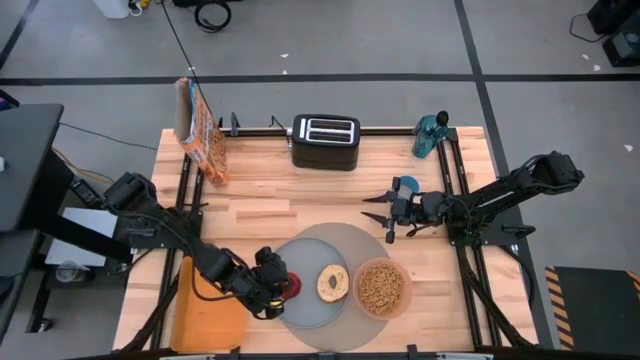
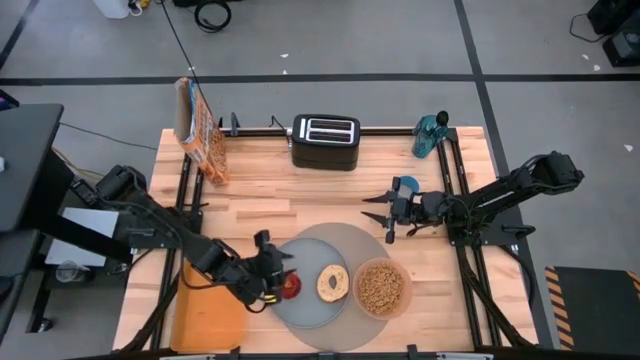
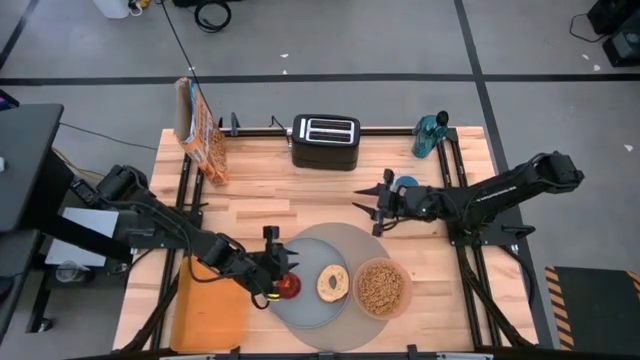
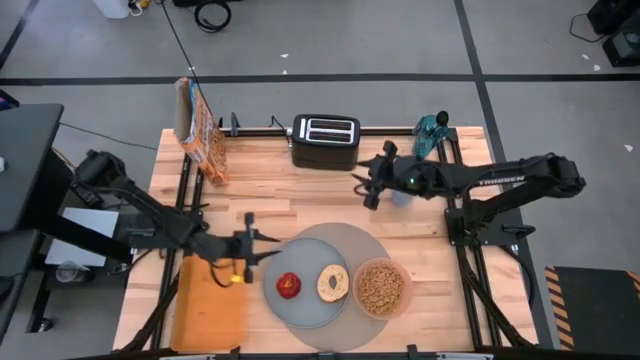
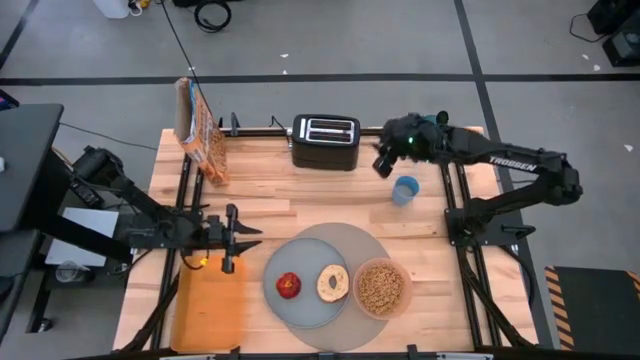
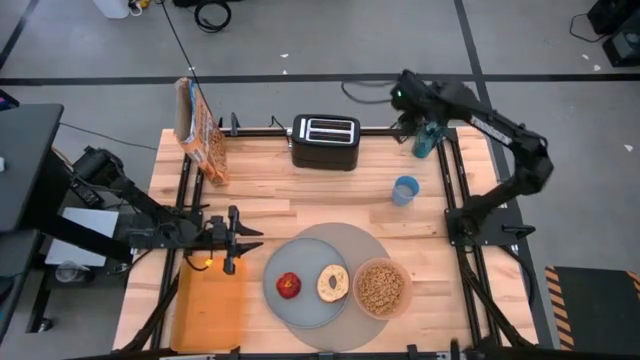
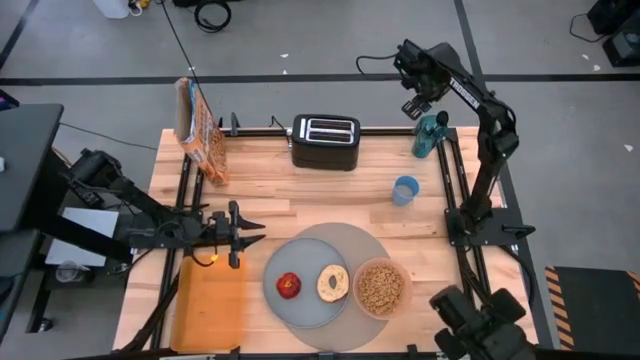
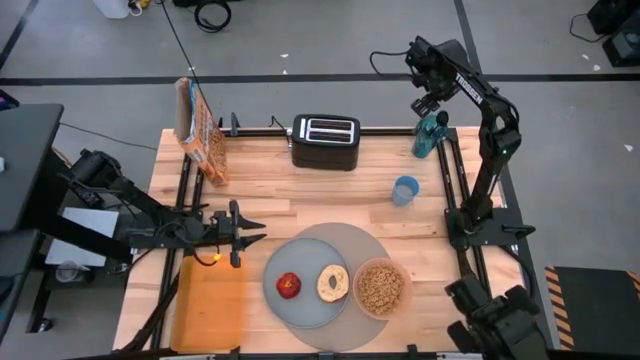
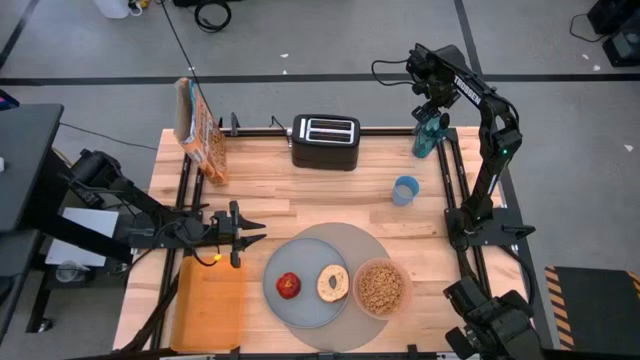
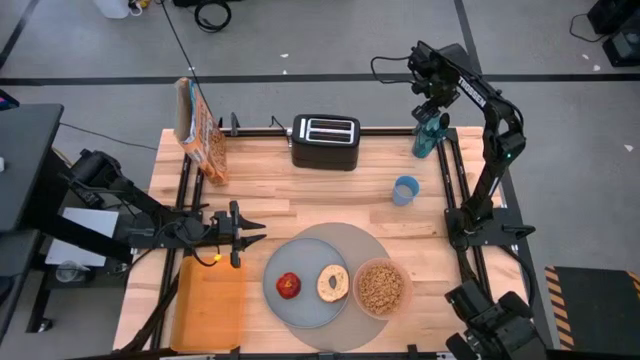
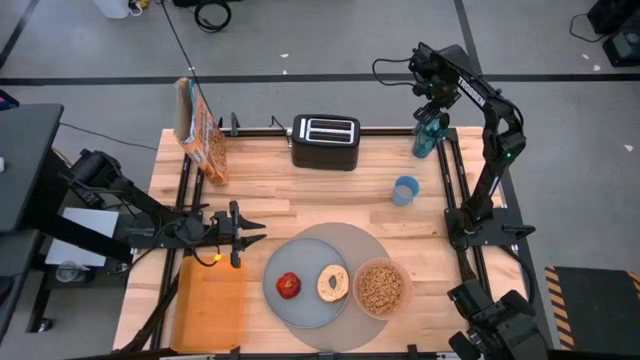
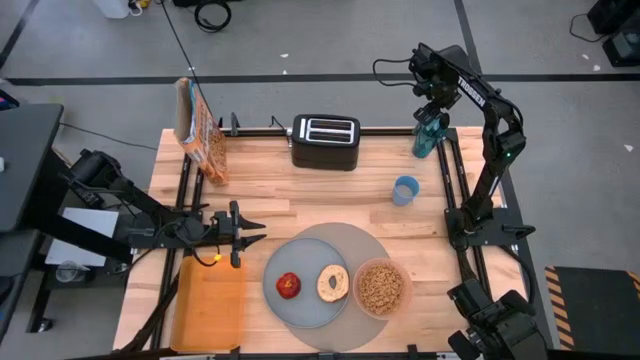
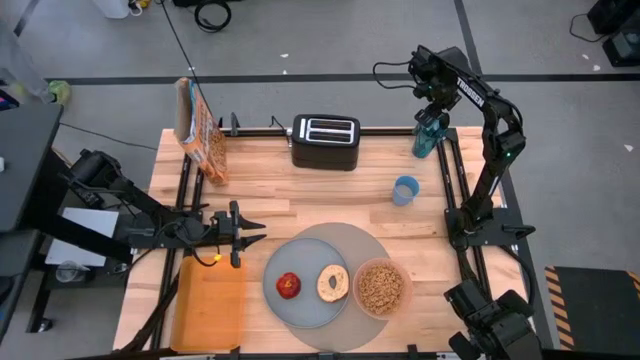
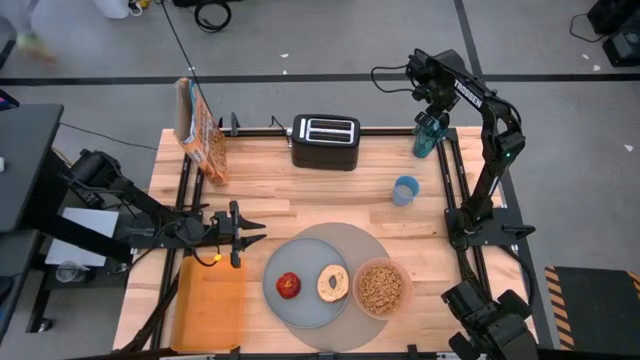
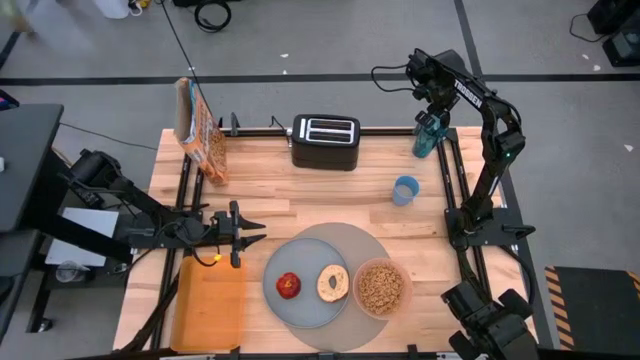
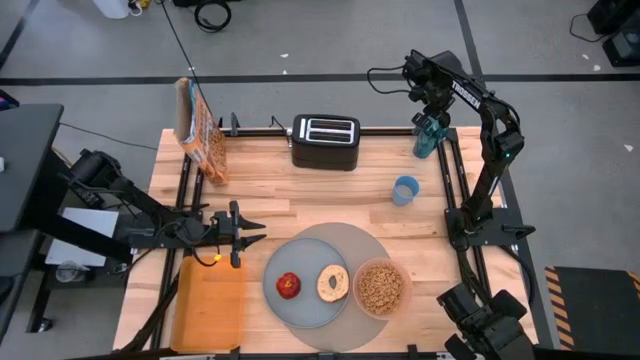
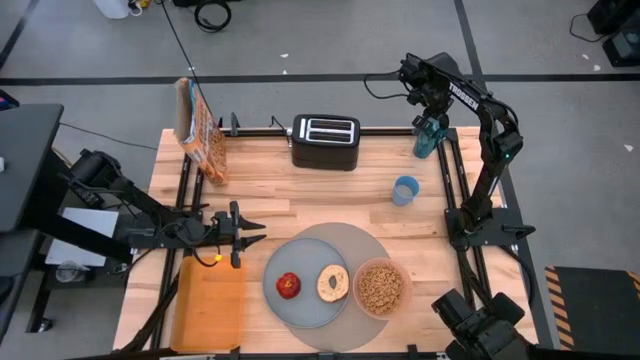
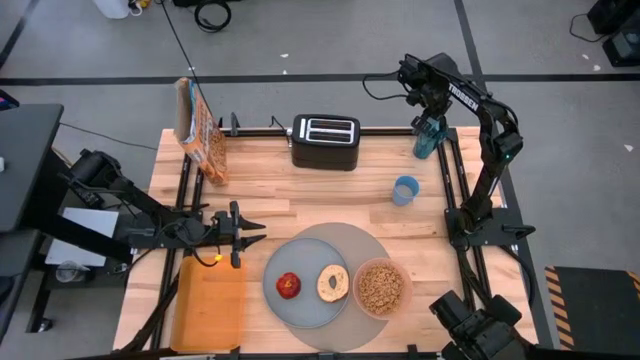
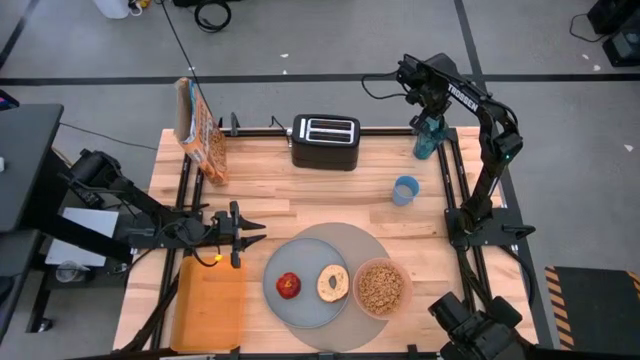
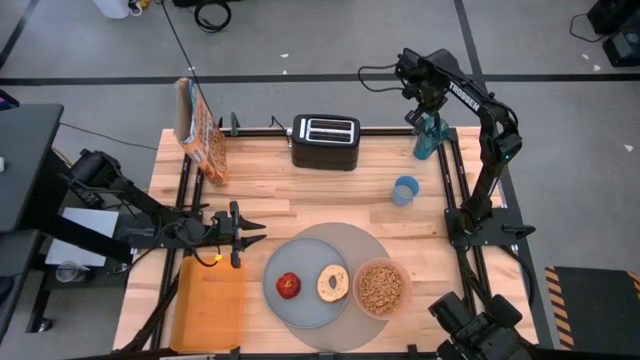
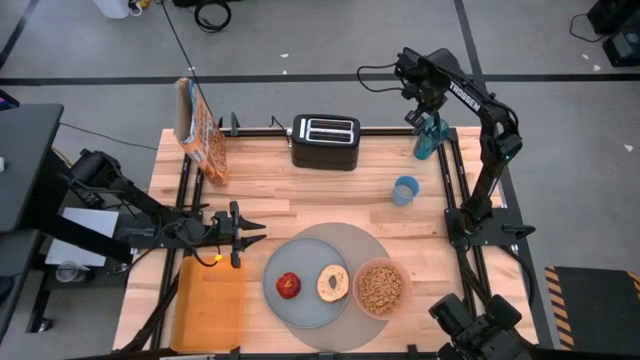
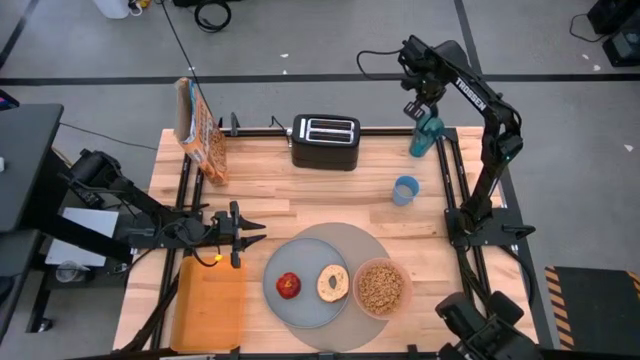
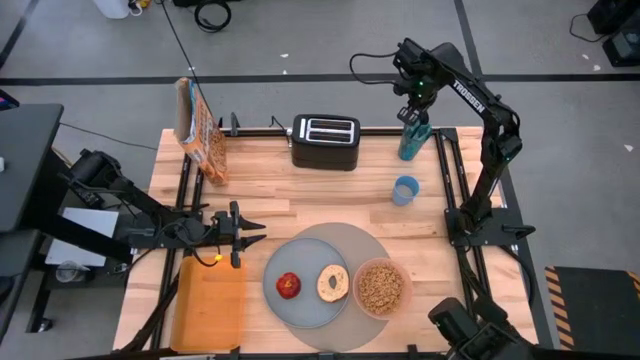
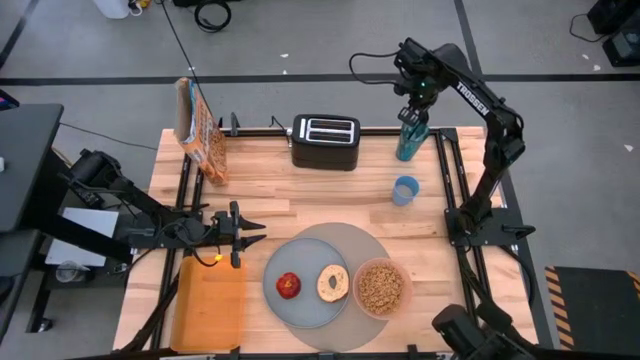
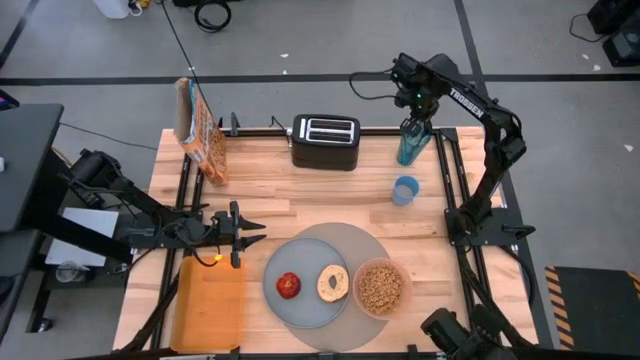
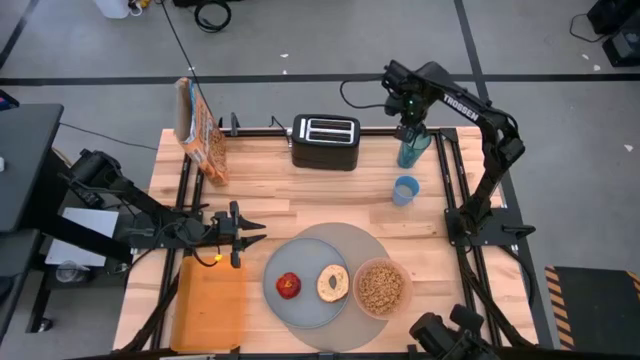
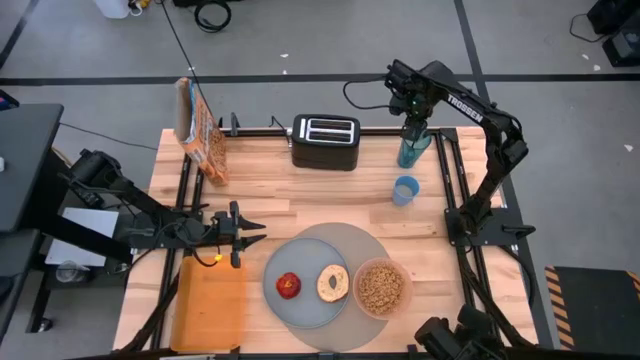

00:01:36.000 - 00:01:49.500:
Task: Arrange a breakfast setting
Put the spoon on the gray table mat between the pink bowl and the blue plate

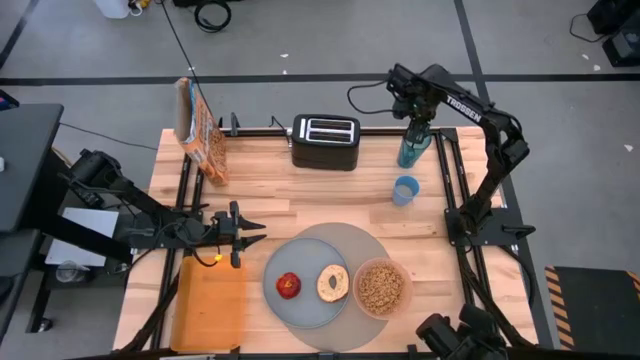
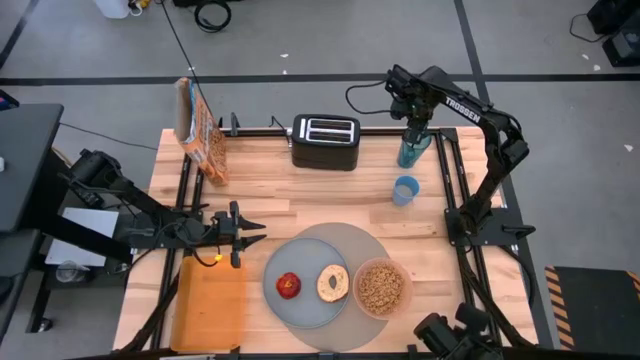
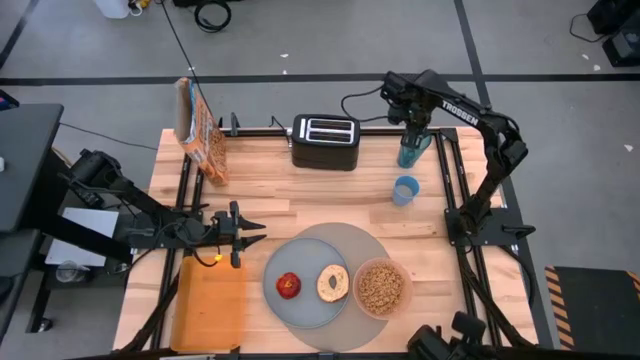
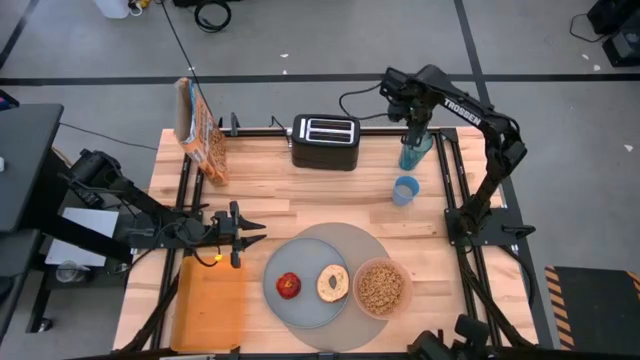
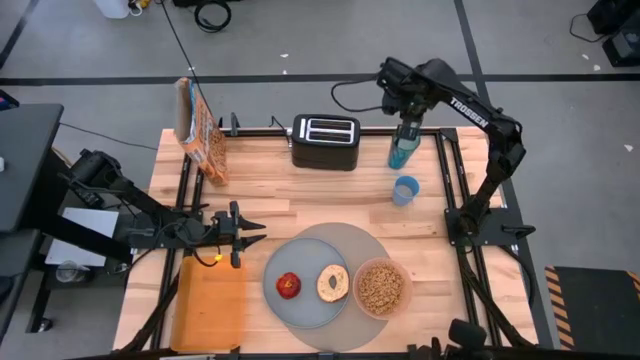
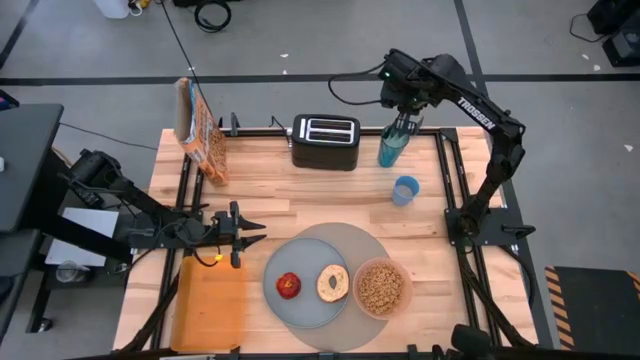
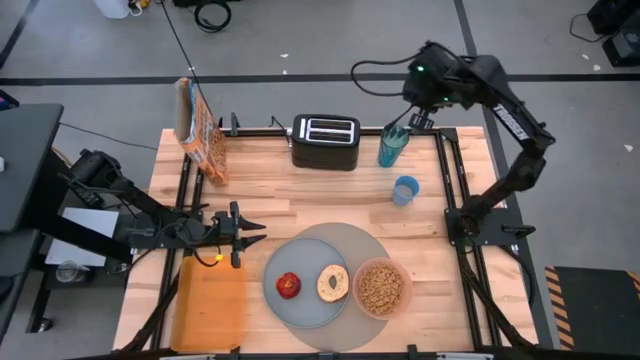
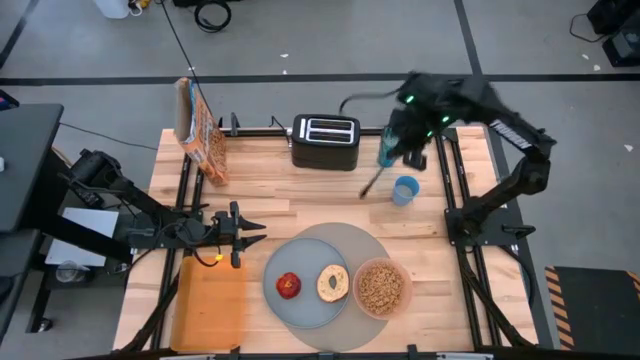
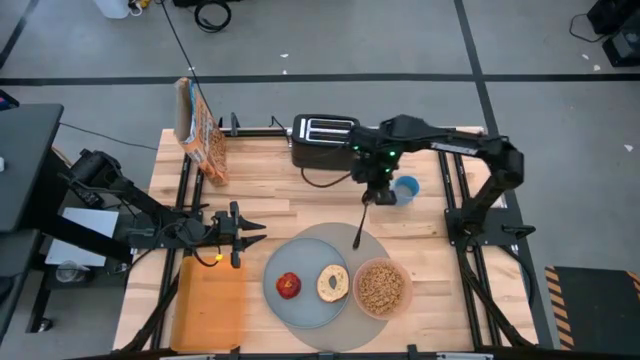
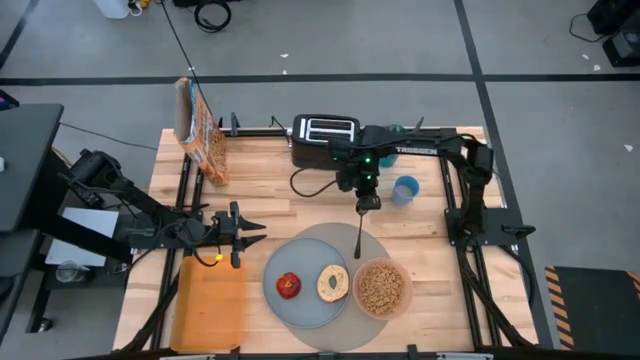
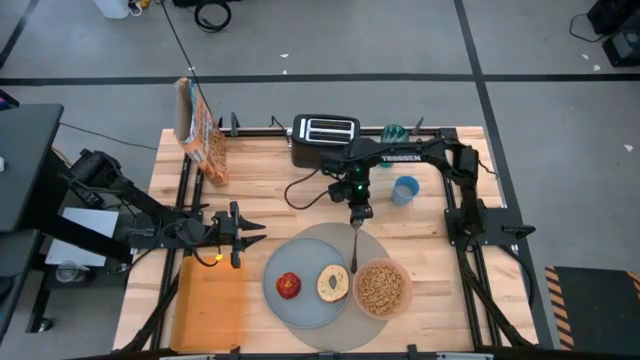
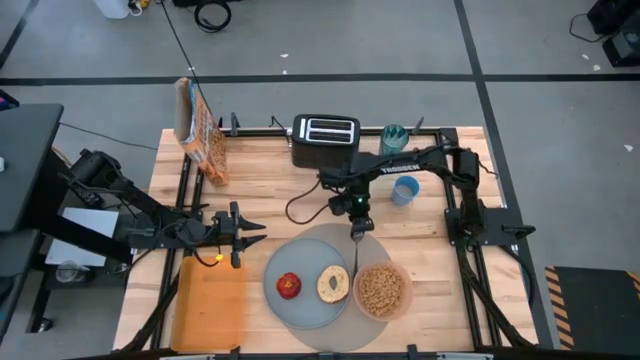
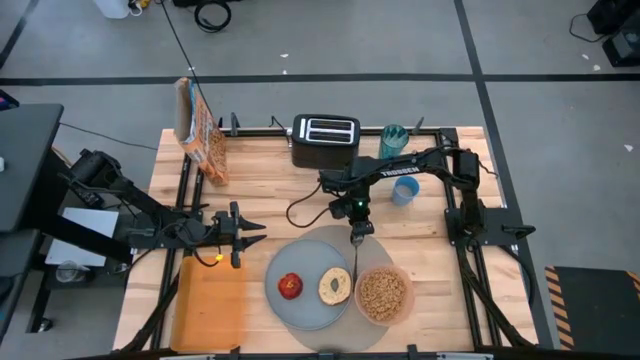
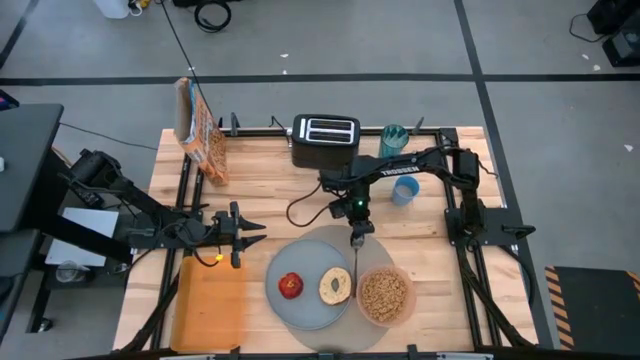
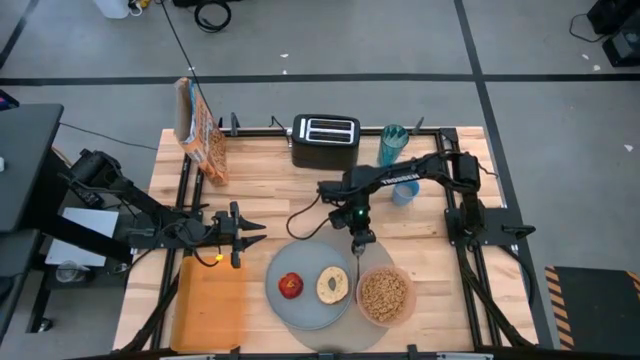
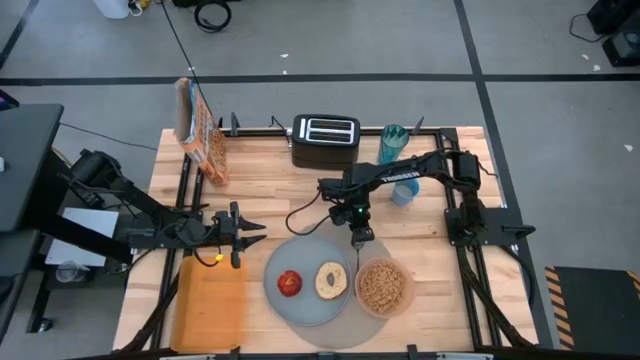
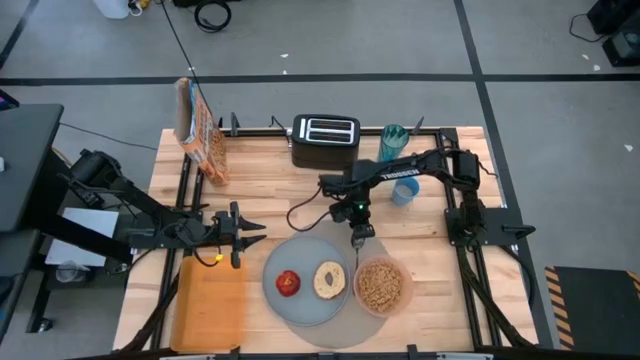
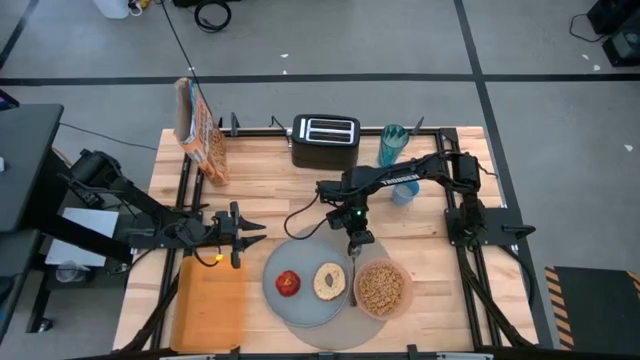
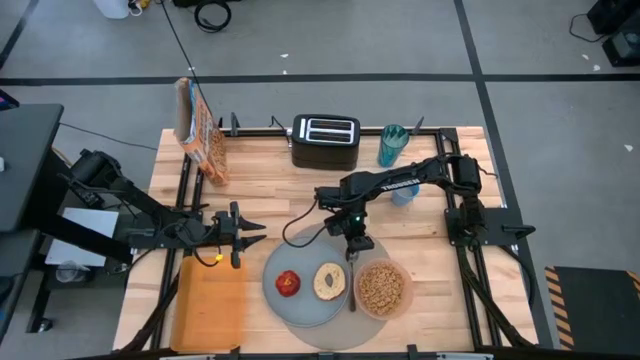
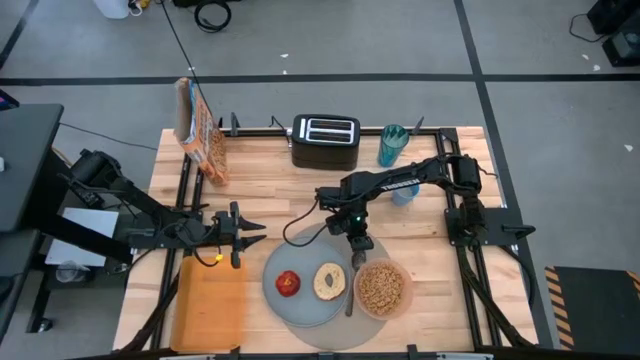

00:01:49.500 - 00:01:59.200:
Put the spoon on the gray table mat between the pink bowl and the blue plate
